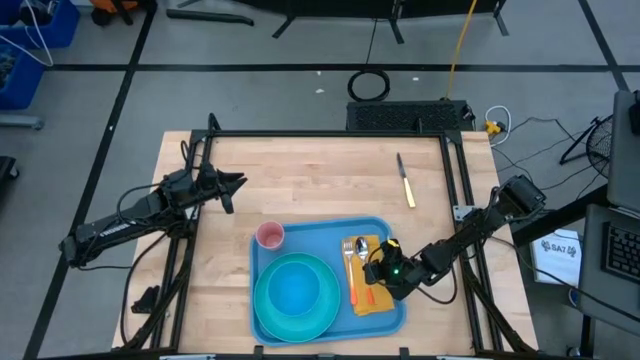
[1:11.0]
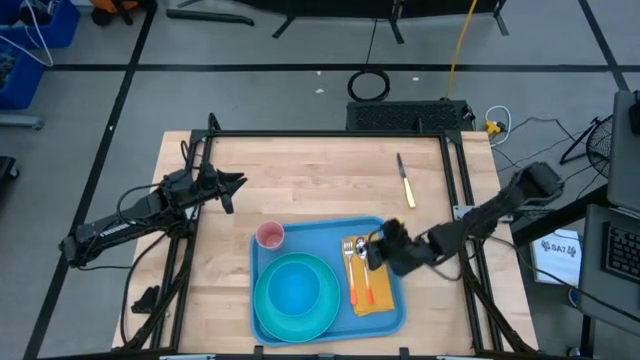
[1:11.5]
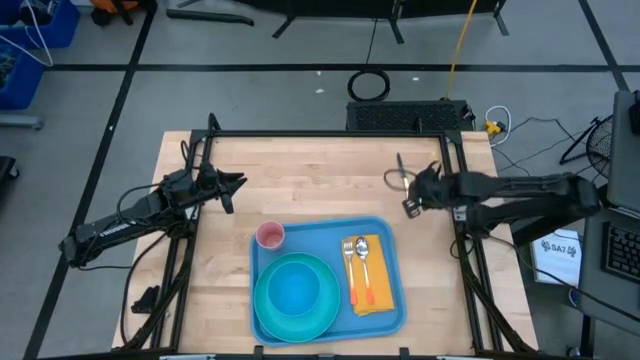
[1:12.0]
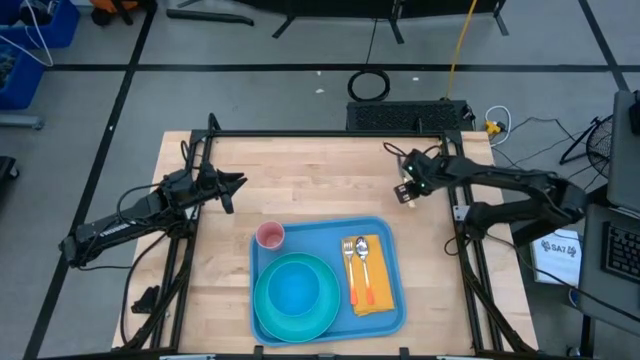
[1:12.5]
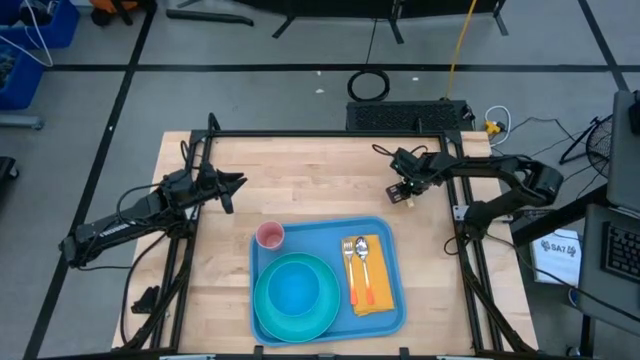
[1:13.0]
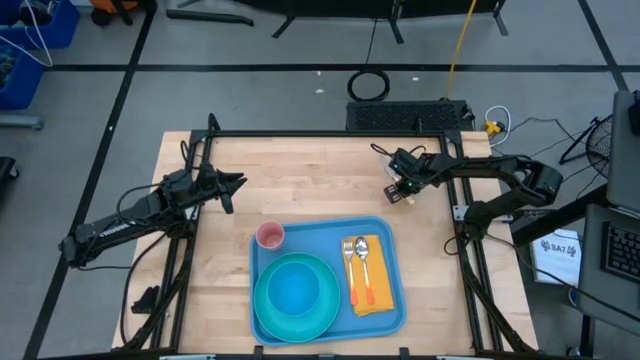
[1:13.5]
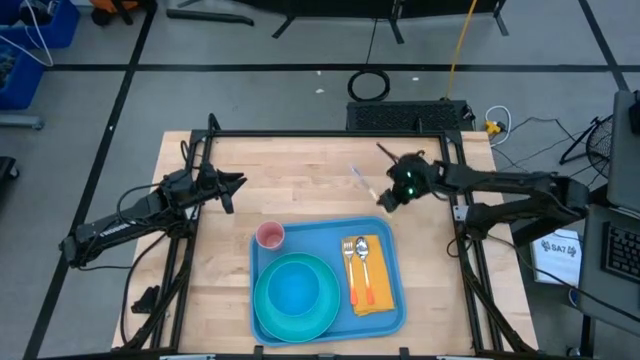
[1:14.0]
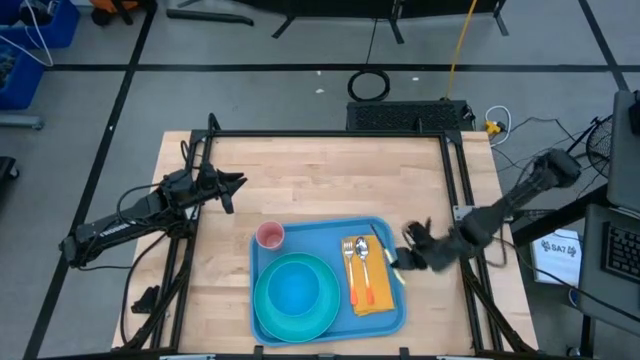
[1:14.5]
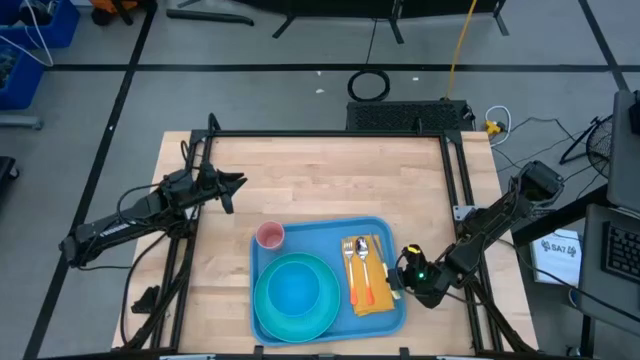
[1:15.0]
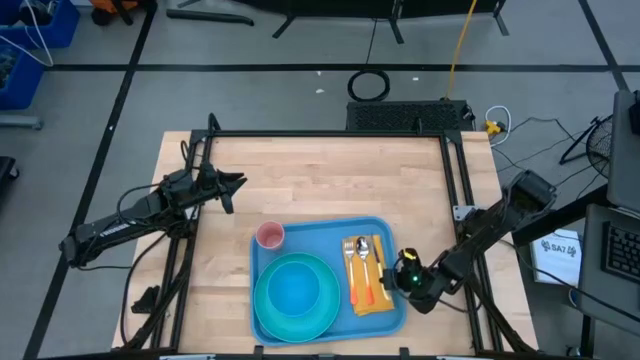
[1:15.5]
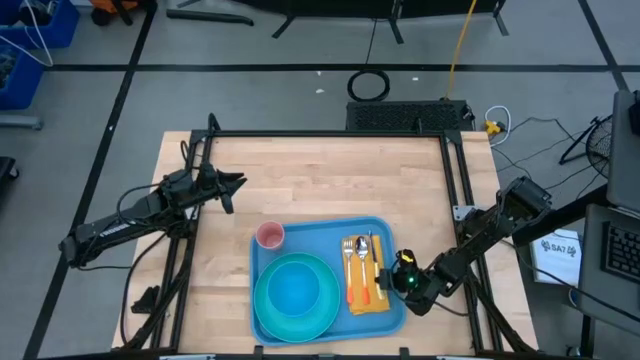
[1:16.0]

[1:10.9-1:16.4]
Task: Set up tray
Put the yellow knife on top of the yellow napkin on the blue tray to the right of the orange spoon

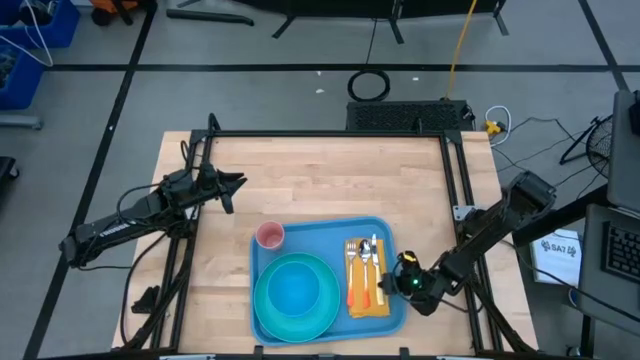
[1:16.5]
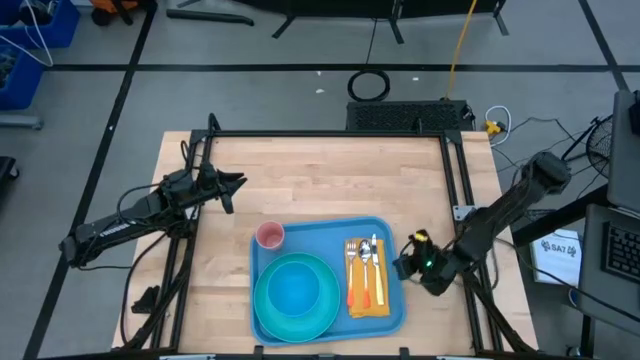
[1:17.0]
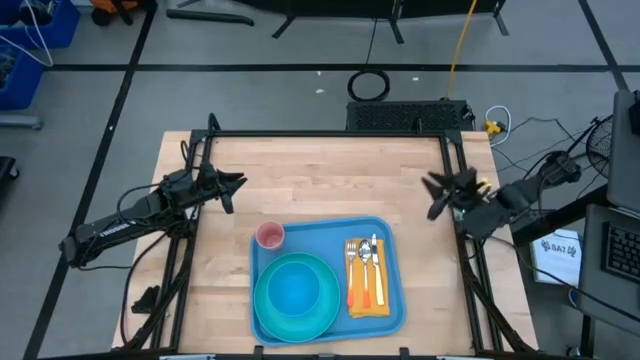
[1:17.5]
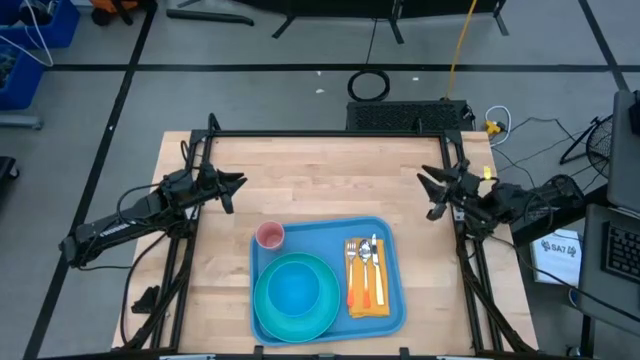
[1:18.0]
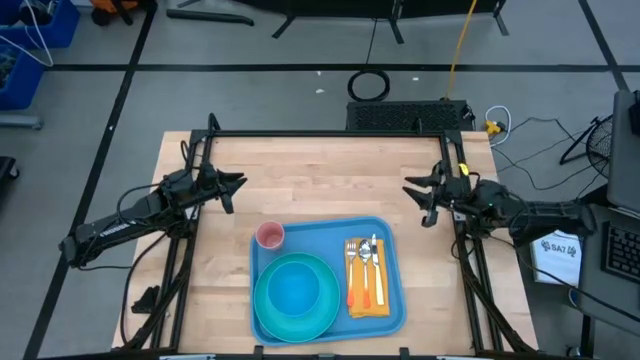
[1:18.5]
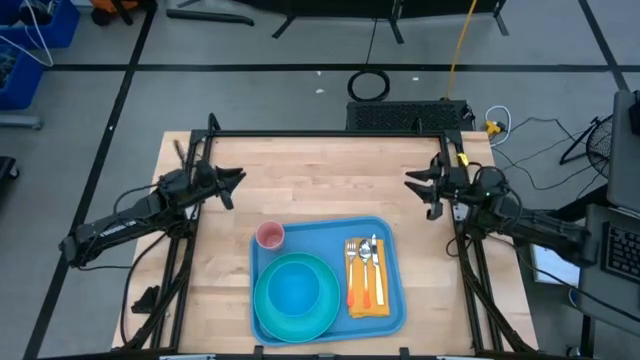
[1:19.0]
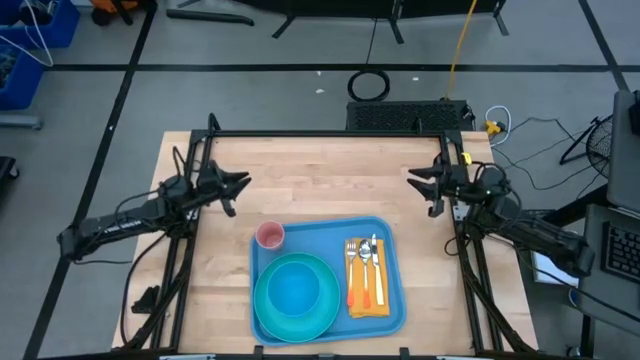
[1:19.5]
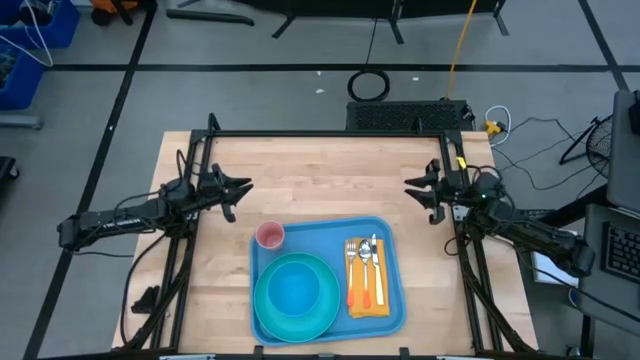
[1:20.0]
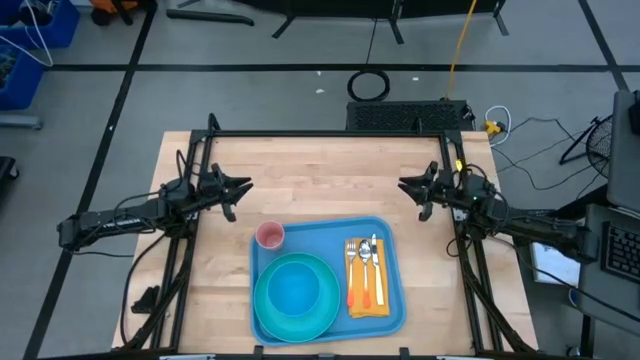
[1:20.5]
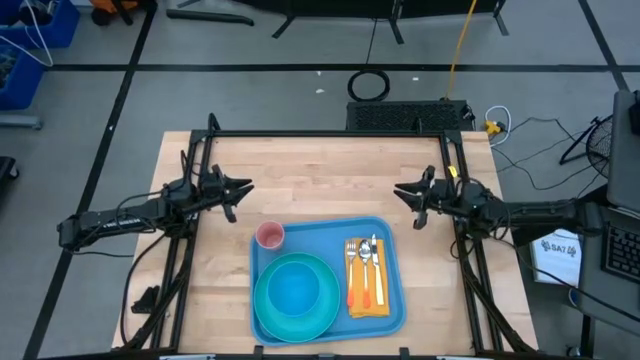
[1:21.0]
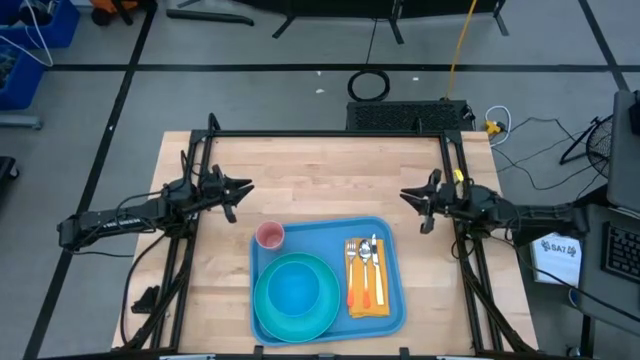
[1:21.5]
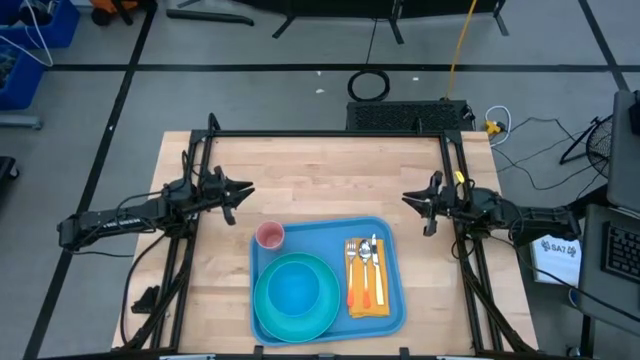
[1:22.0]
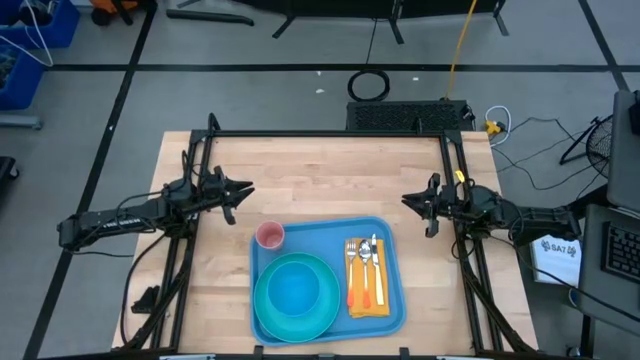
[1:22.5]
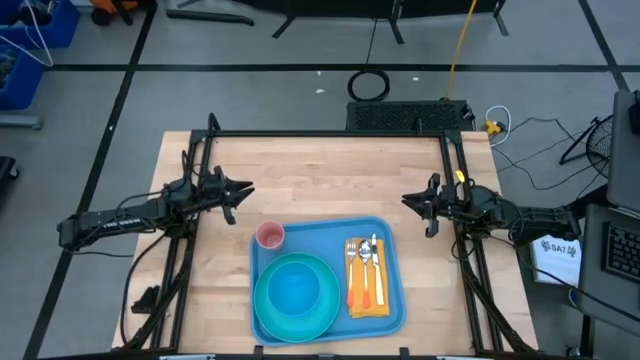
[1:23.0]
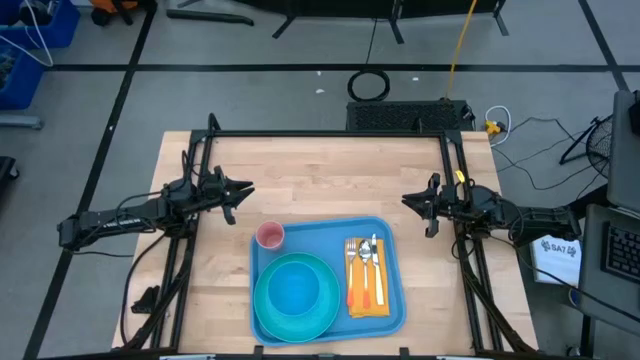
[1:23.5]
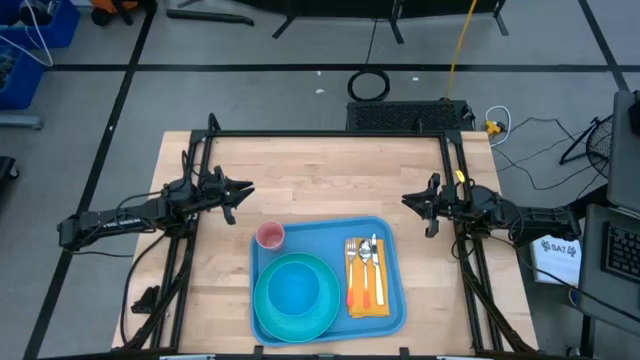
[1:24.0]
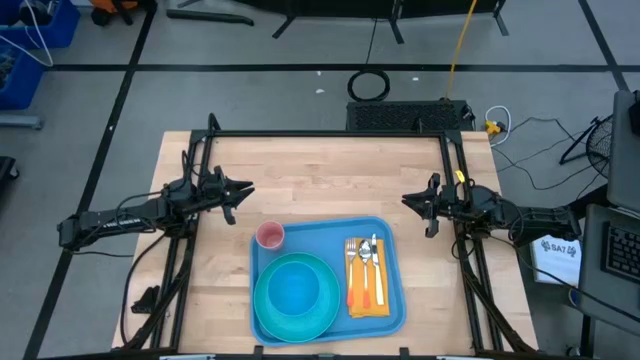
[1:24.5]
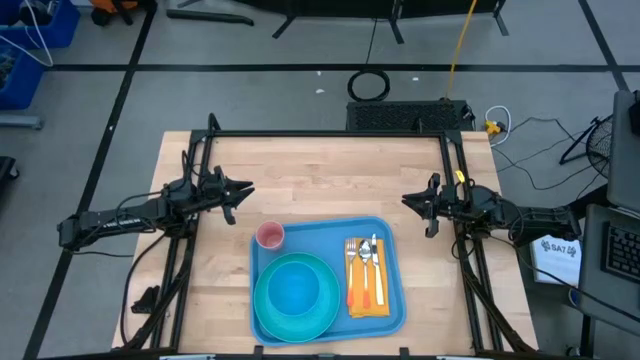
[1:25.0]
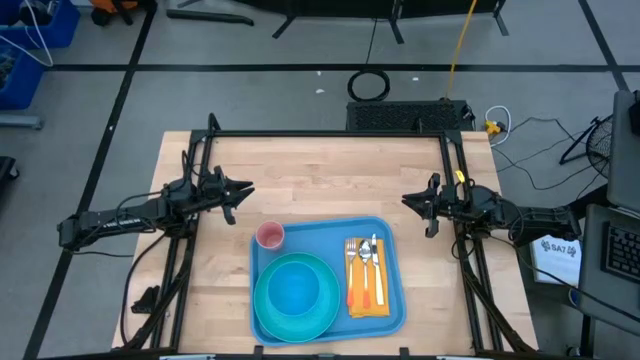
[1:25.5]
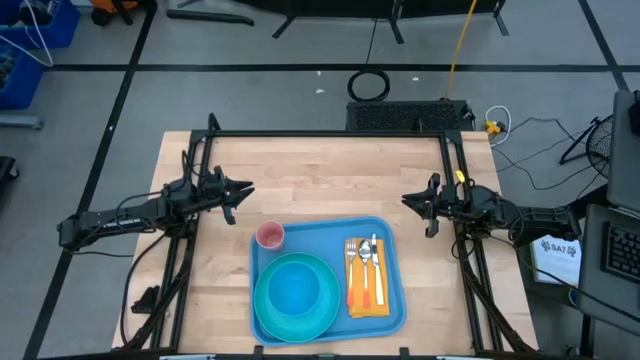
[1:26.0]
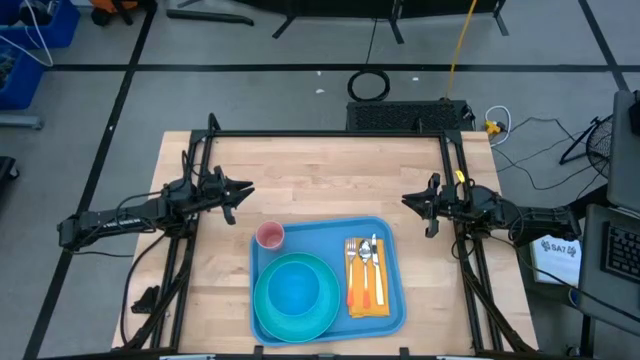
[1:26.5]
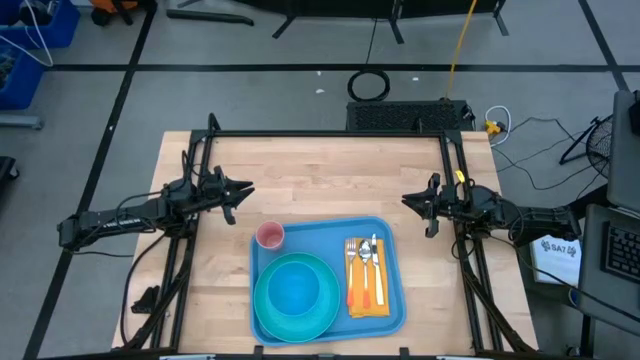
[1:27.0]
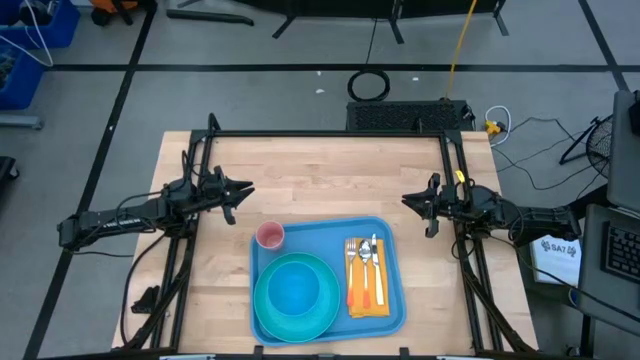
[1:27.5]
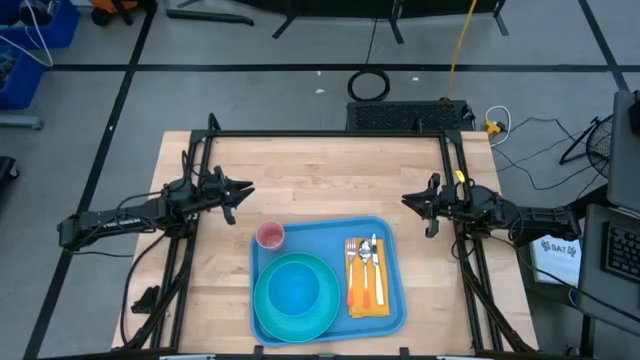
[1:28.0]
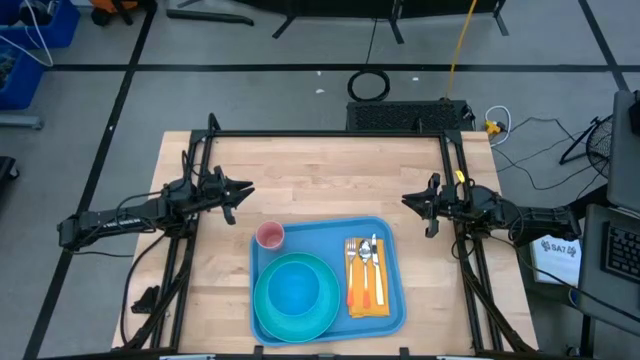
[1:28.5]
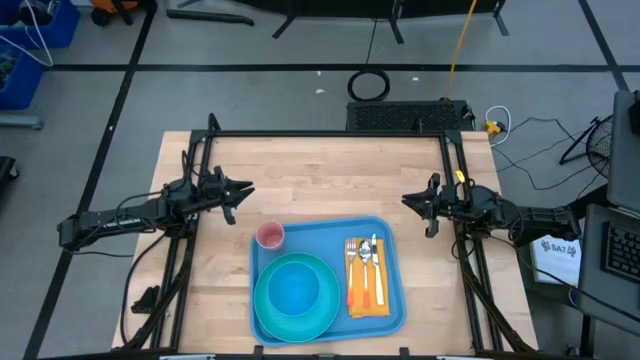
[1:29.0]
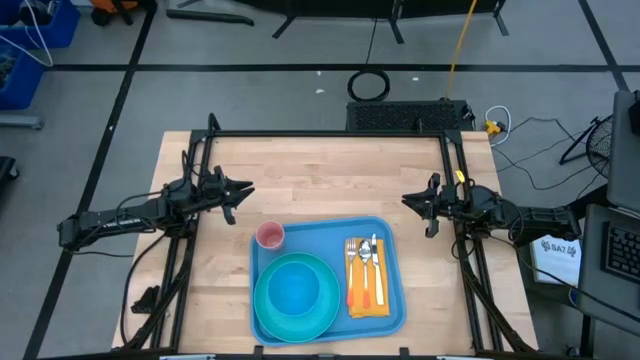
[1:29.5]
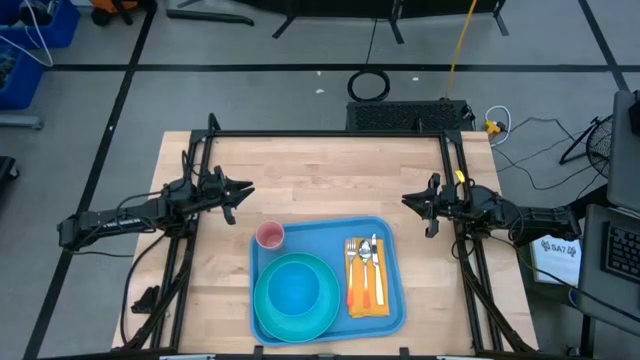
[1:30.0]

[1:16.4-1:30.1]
Return to Home Position

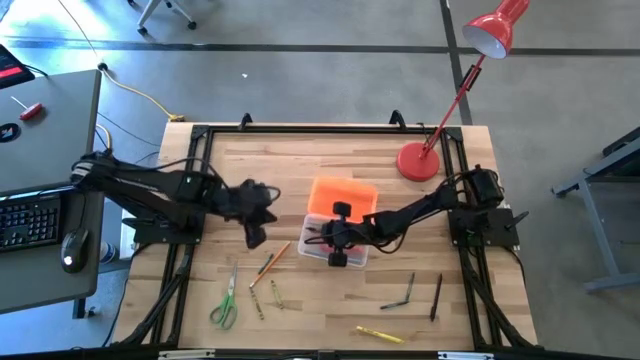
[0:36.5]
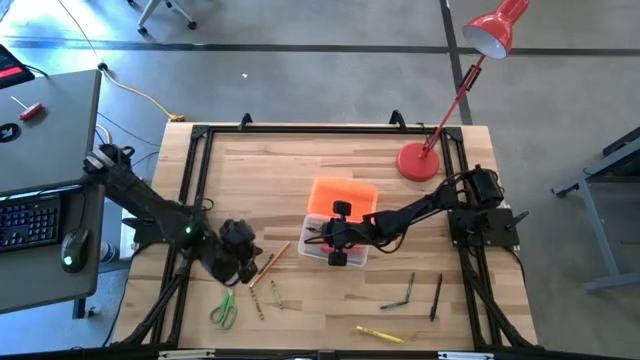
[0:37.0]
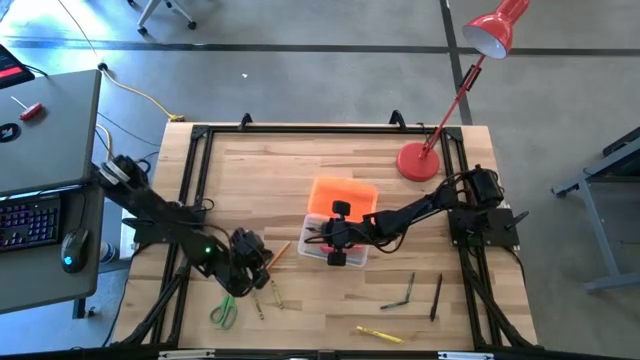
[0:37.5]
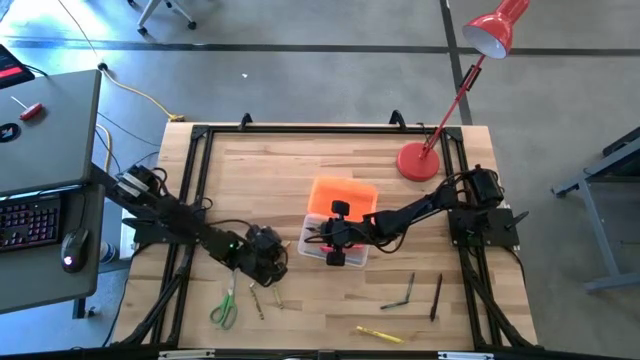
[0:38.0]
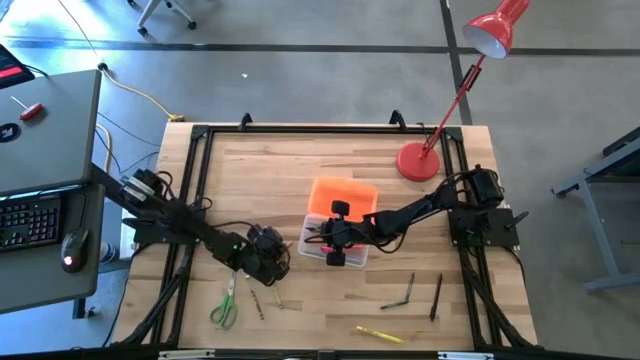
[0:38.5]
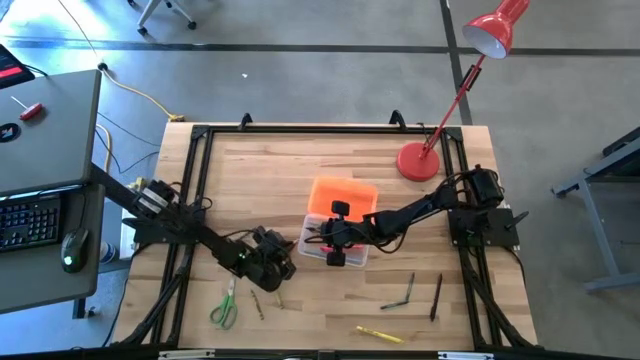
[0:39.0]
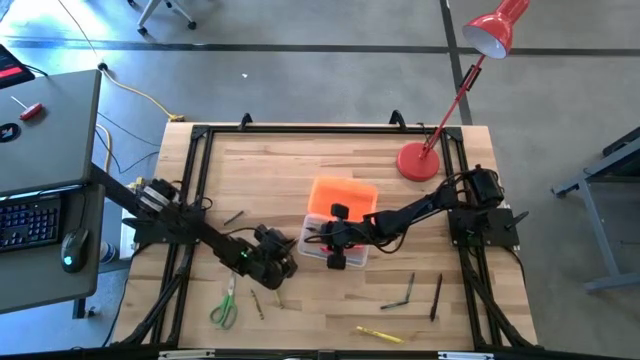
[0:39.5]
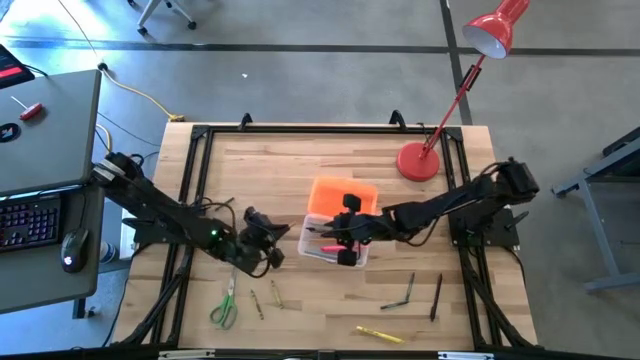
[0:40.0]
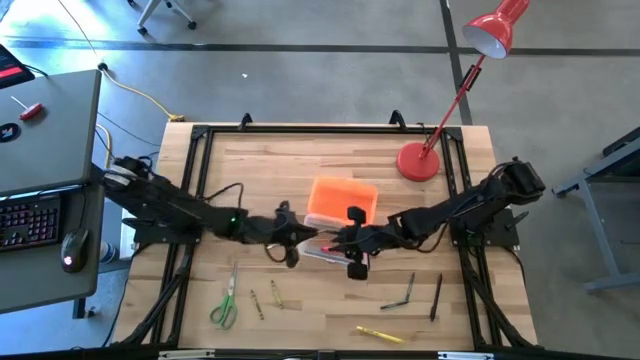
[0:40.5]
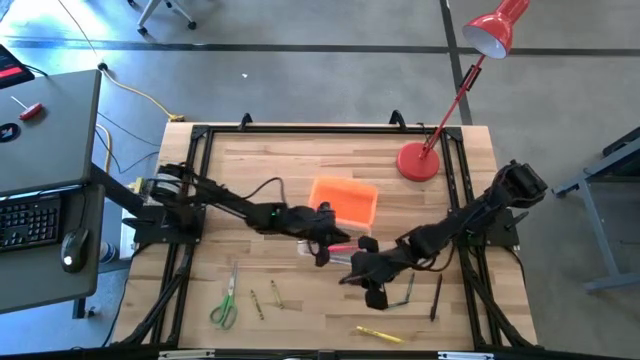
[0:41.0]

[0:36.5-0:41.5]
Task: Pick & place school supplies into a supply box
Put the orange pencil into the supply box
